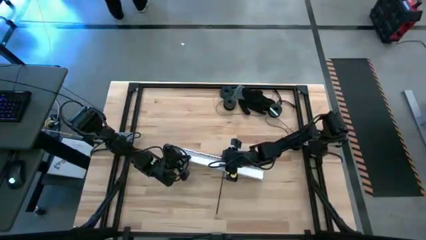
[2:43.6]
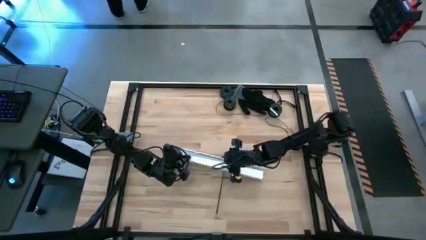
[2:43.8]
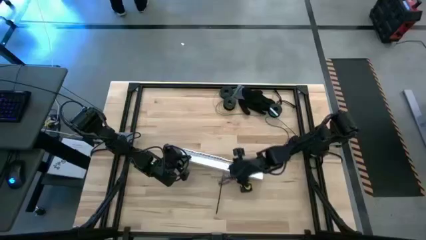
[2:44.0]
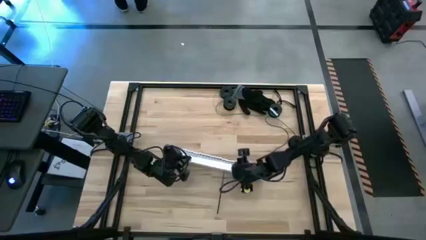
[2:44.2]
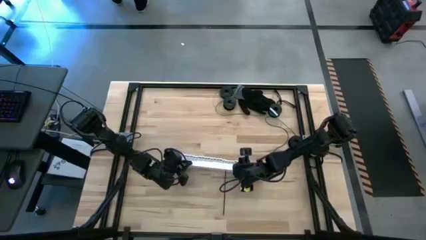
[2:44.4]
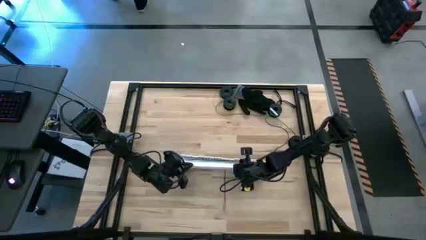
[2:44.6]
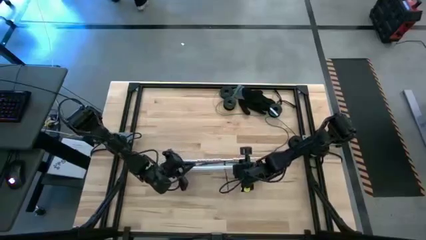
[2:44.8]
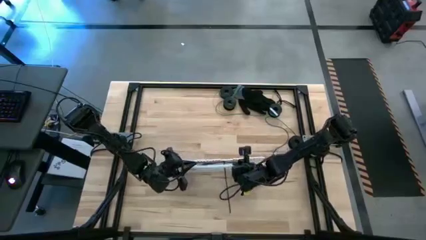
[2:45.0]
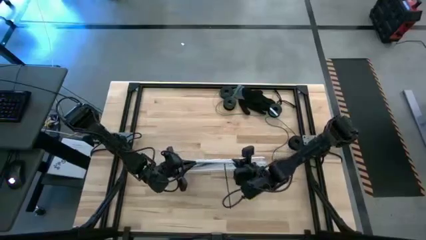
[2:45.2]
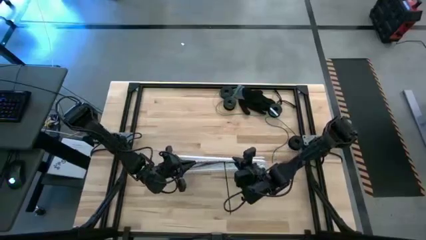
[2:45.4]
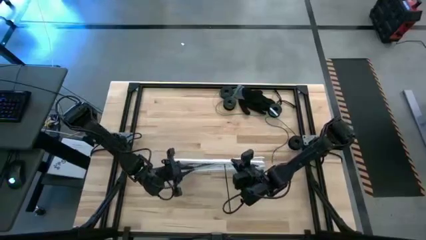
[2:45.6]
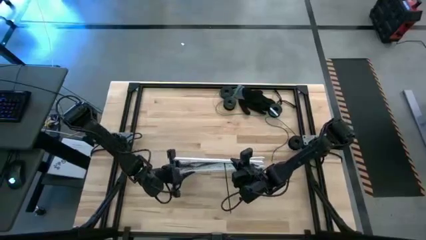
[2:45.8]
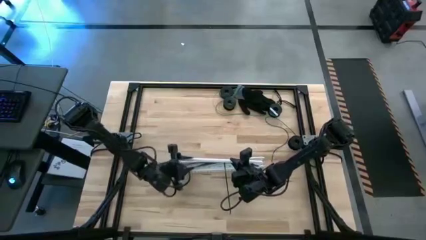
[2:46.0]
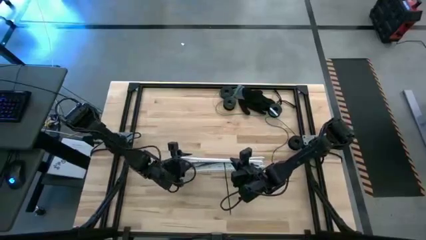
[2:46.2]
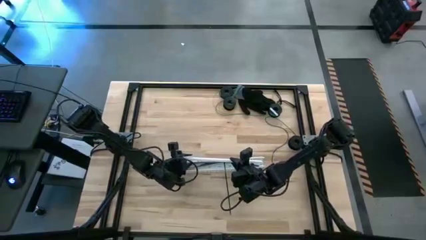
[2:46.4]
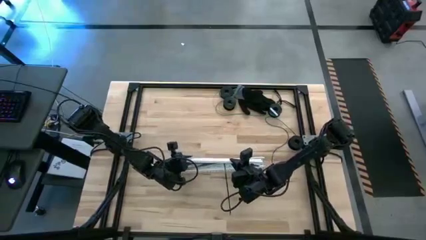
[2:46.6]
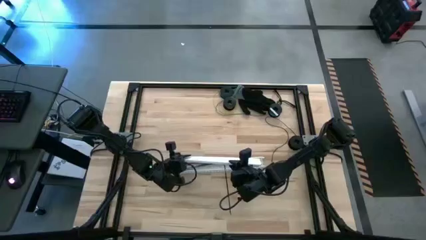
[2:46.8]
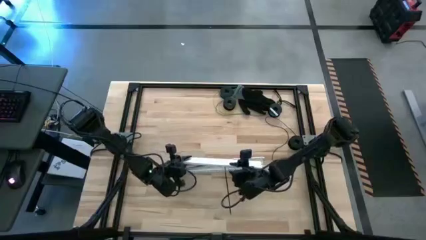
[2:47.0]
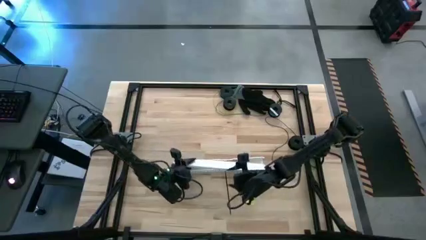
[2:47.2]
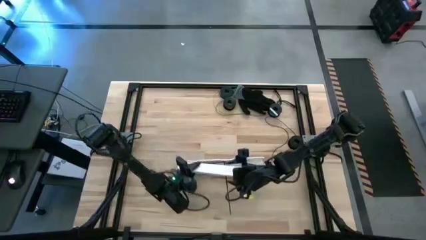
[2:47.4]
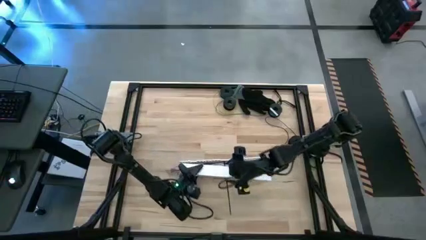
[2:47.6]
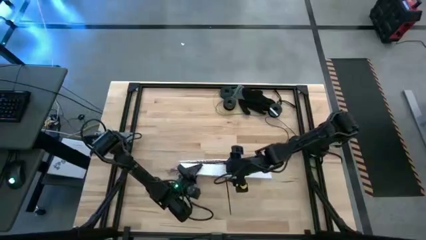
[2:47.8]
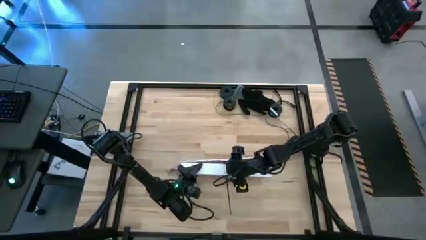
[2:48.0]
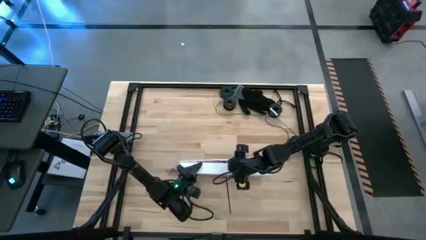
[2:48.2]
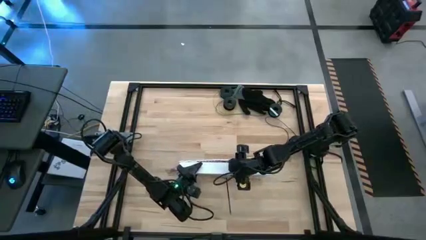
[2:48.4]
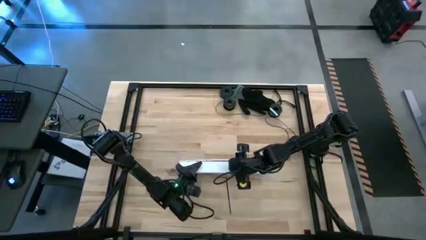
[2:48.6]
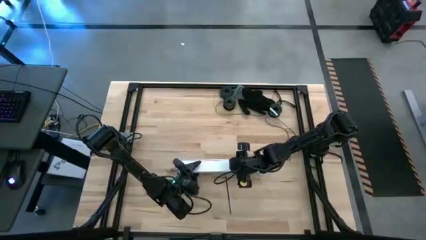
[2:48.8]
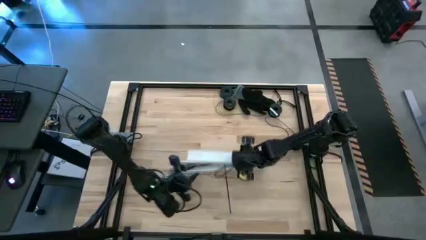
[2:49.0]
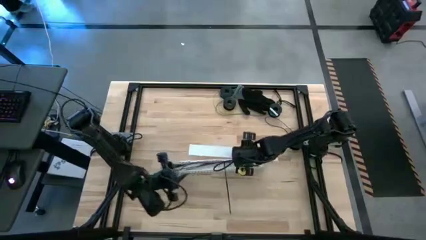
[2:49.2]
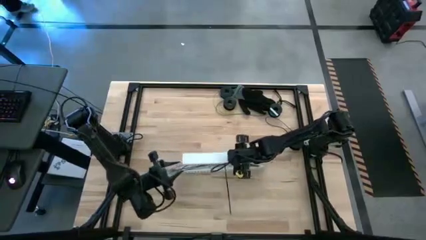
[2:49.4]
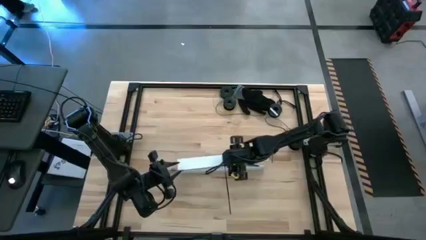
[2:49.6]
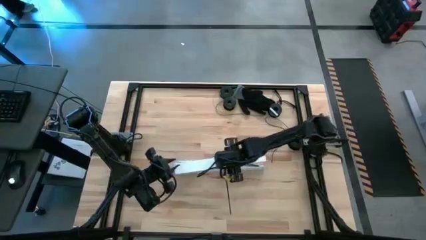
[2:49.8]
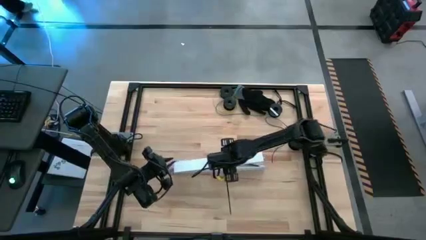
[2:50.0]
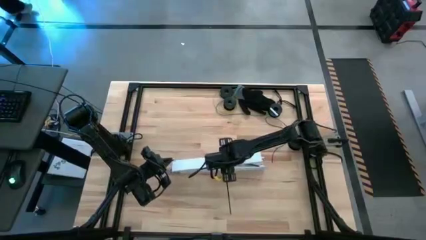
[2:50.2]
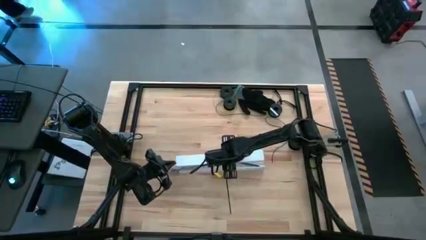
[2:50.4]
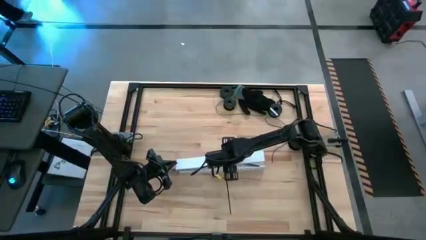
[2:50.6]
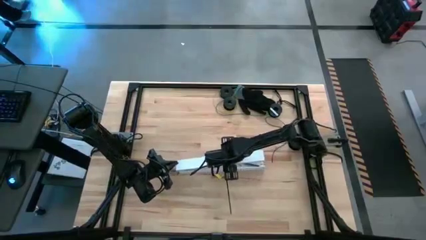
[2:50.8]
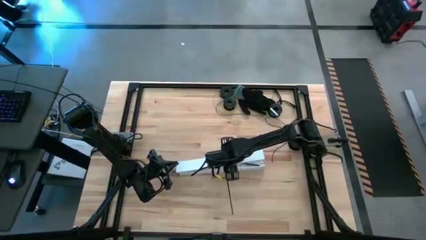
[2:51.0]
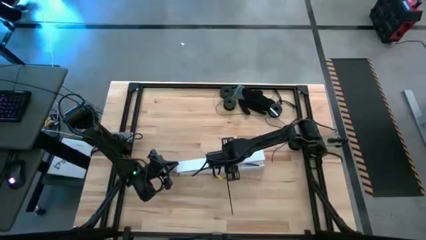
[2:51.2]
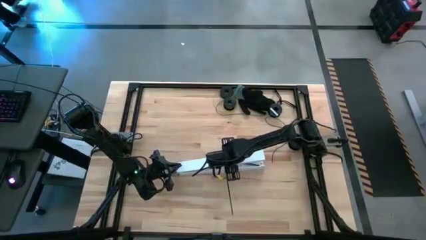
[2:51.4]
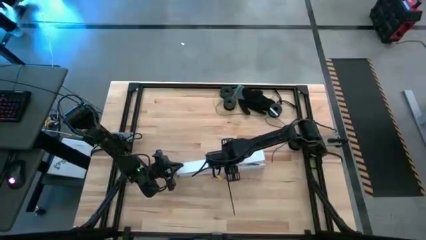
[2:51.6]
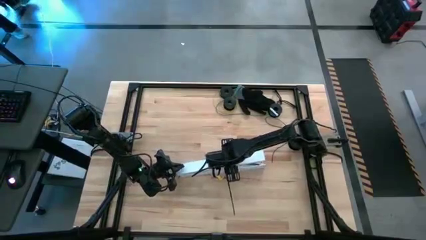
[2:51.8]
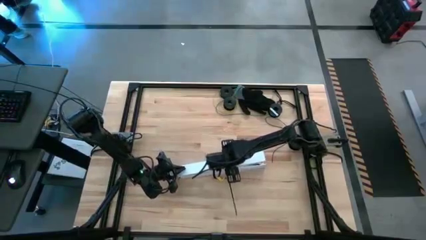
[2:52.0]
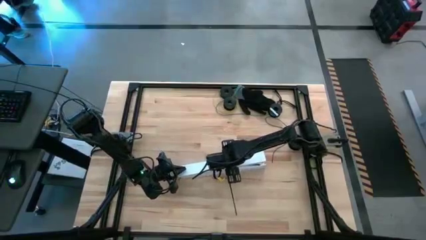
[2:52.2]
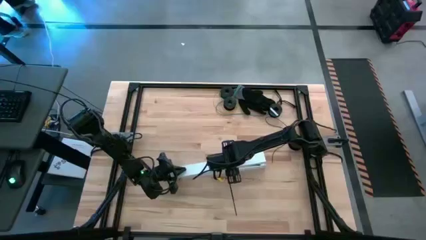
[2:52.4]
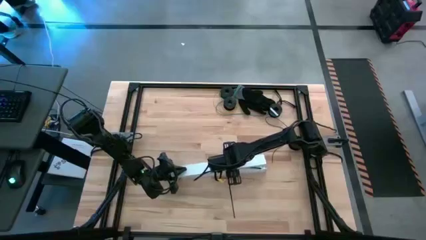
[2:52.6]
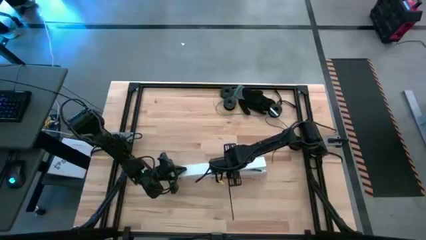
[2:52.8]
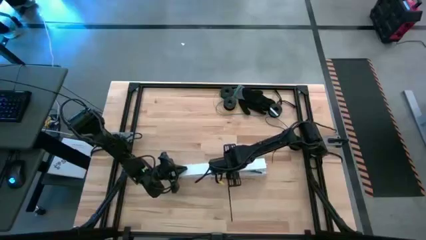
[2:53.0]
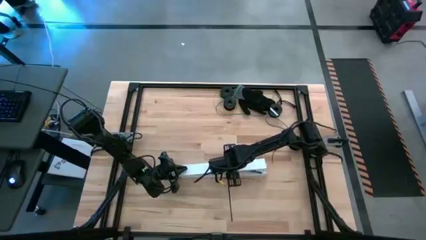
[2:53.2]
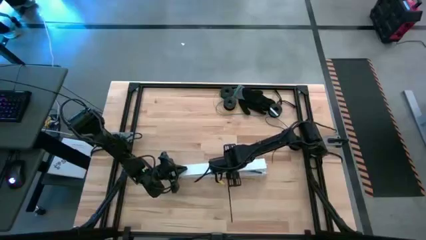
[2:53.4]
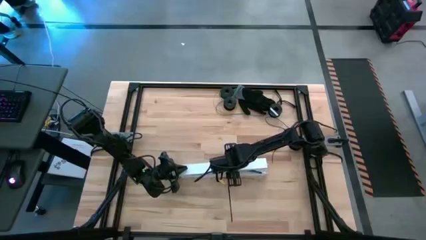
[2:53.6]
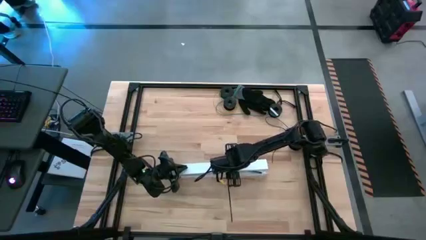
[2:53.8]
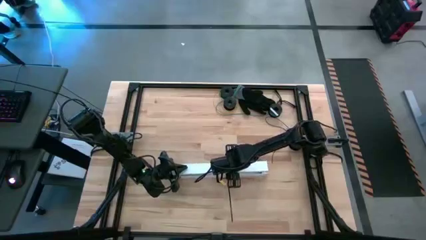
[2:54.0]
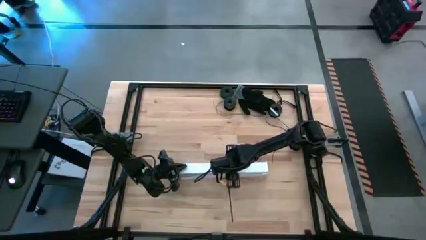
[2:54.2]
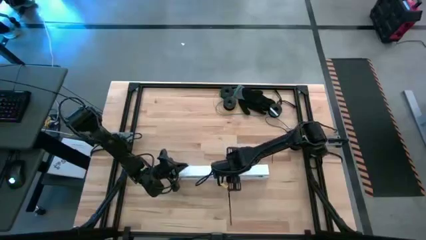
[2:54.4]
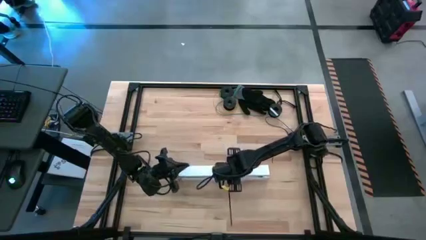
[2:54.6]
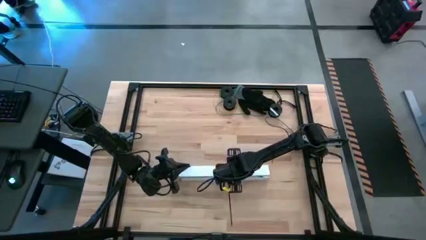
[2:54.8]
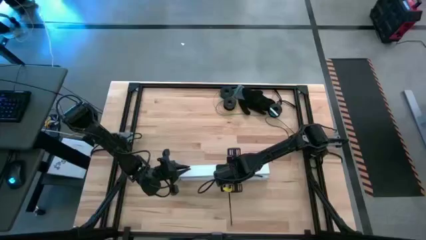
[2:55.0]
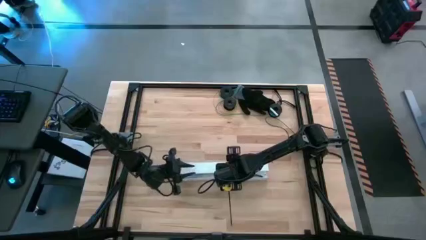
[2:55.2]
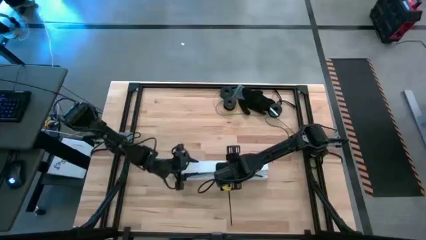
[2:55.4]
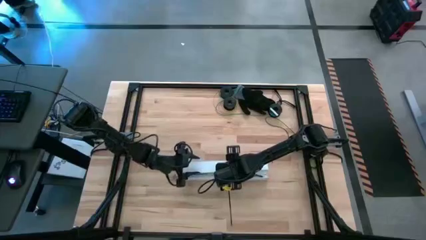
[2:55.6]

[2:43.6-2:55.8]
Task: Ziptie cables
Close the white cable duct

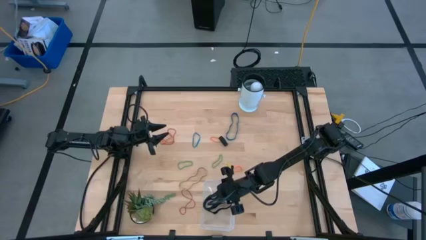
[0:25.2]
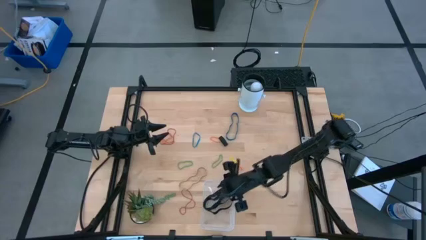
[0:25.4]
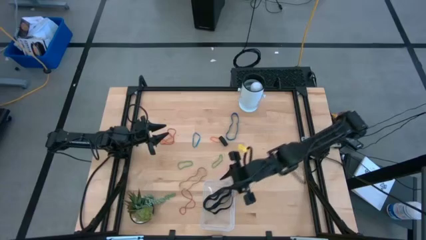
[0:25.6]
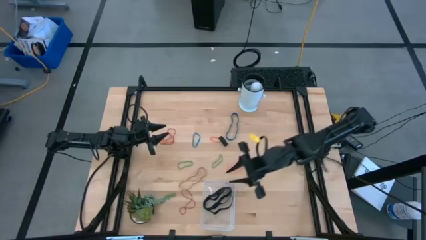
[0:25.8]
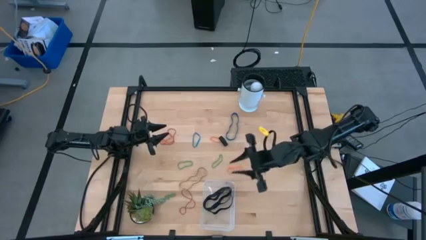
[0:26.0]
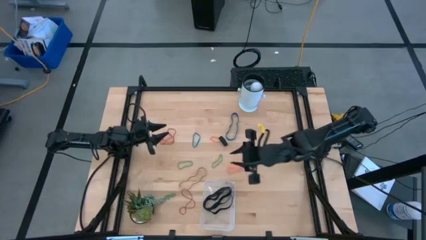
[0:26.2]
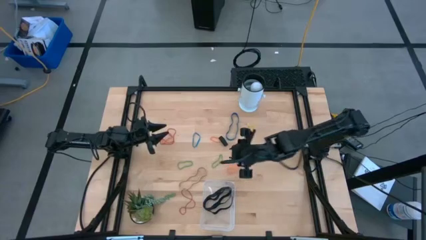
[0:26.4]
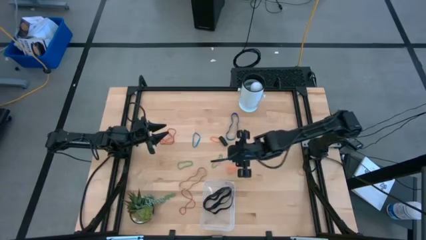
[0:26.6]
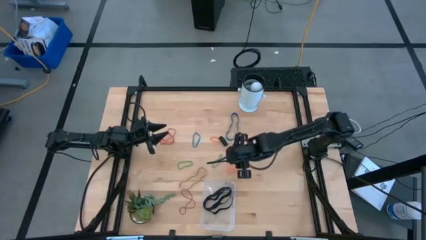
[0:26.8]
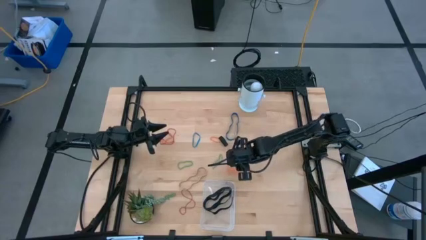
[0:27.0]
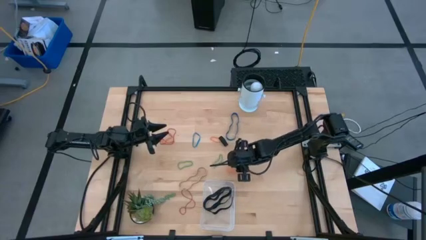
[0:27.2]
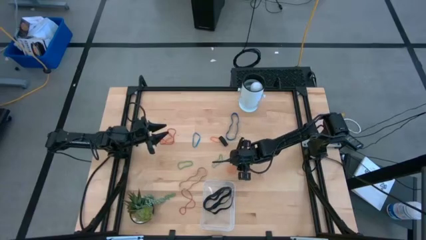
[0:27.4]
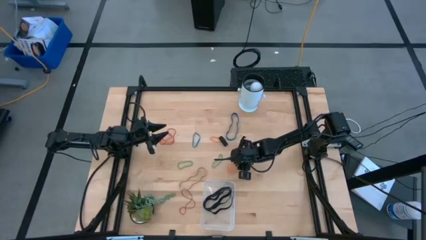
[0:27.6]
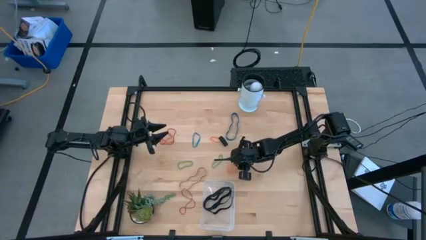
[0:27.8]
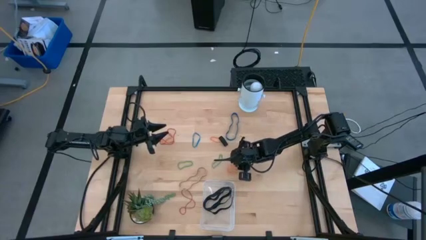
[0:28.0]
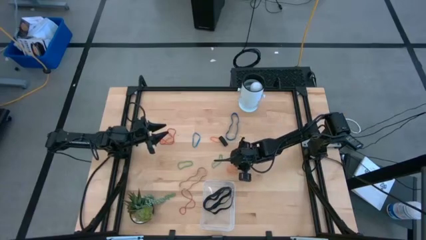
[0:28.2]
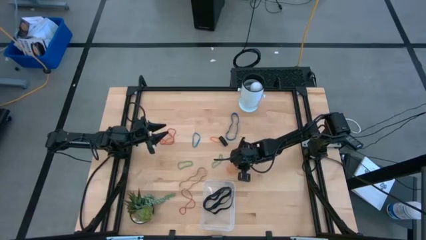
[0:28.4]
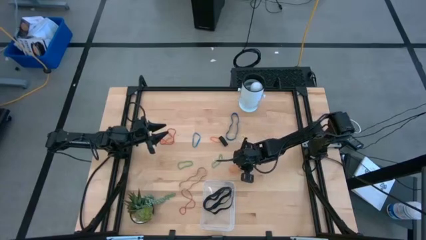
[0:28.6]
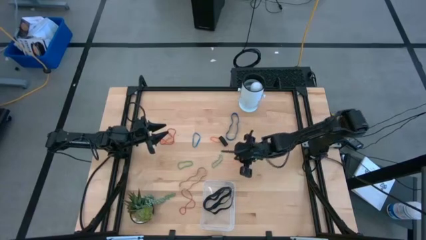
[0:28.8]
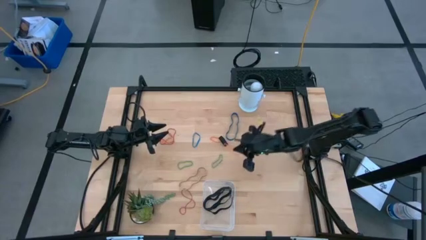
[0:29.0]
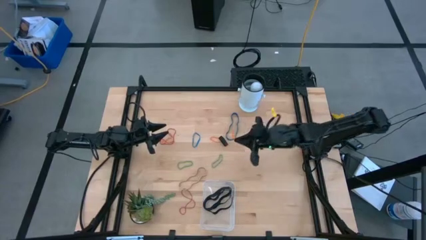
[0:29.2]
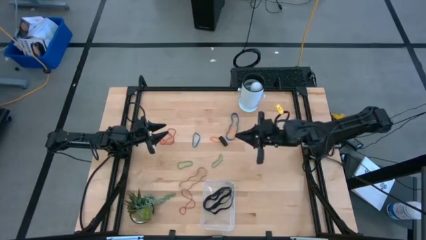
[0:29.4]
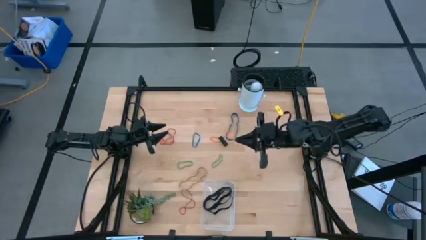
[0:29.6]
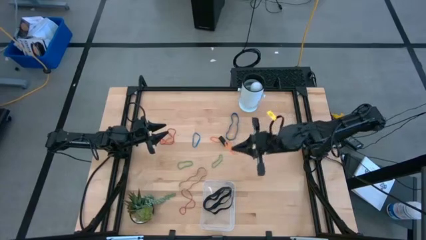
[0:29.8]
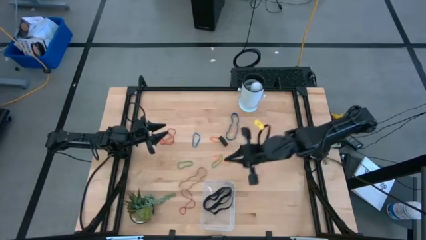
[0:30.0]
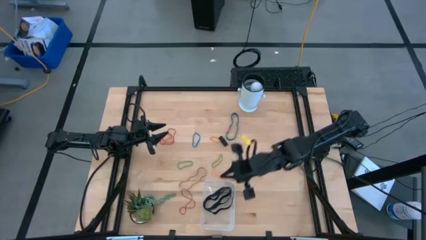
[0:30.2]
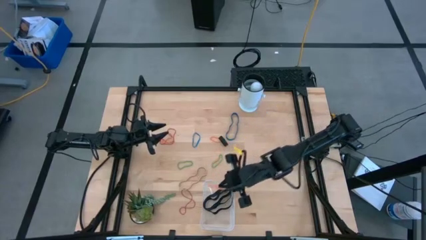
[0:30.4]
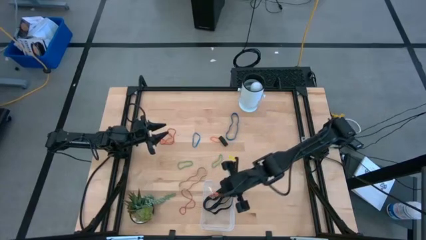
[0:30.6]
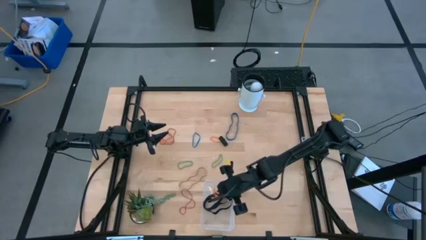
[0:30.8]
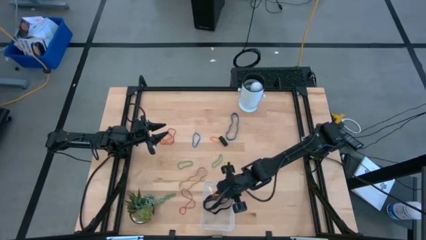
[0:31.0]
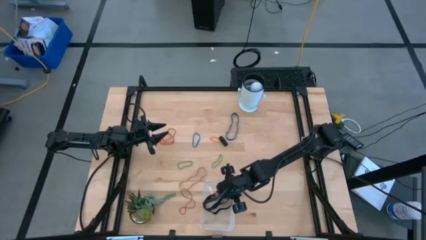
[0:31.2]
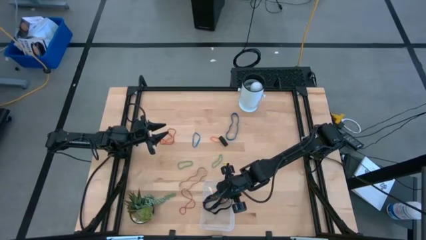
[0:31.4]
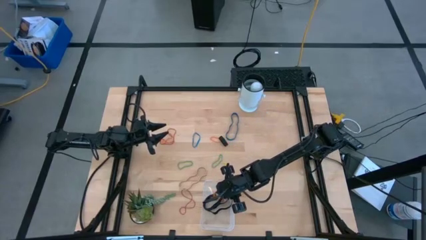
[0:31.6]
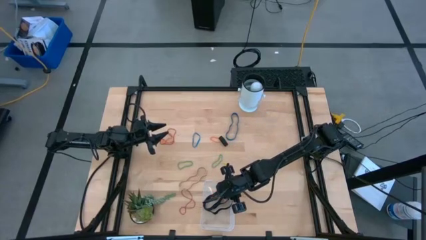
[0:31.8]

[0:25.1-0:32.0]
Task: Pick and place rubber bands into bin
Put the orange rubber band into the transparent bin
